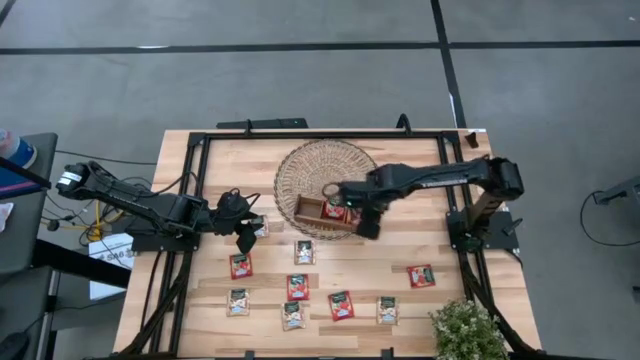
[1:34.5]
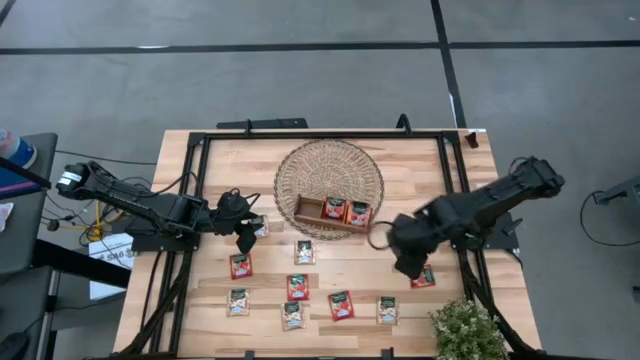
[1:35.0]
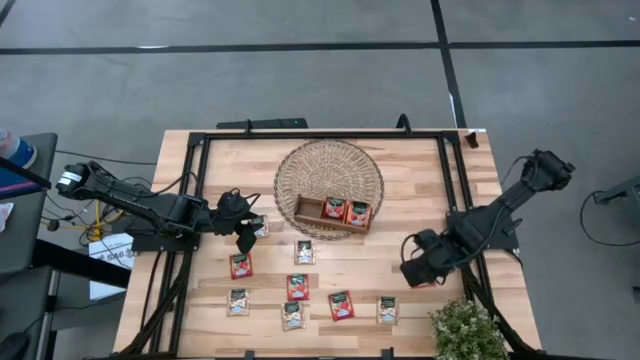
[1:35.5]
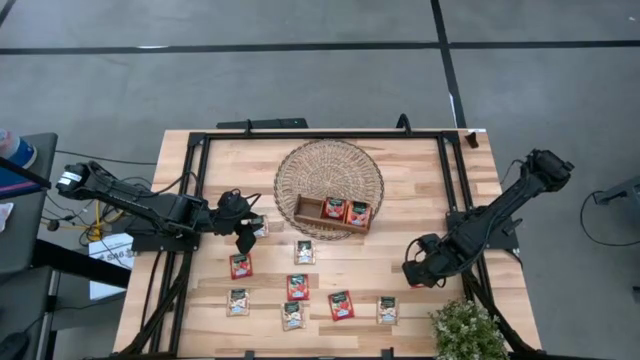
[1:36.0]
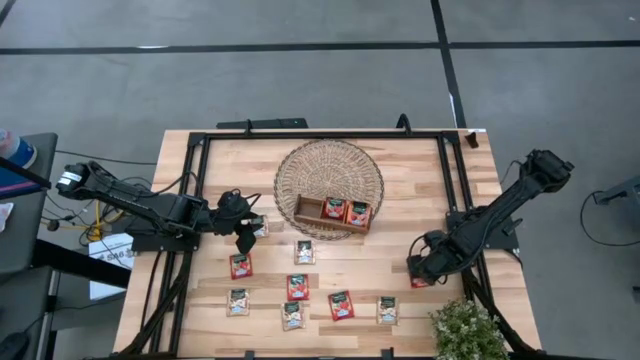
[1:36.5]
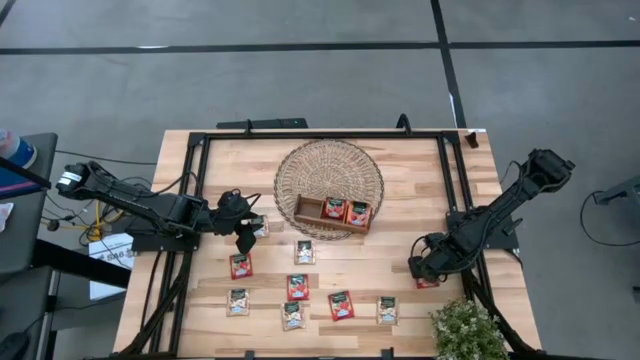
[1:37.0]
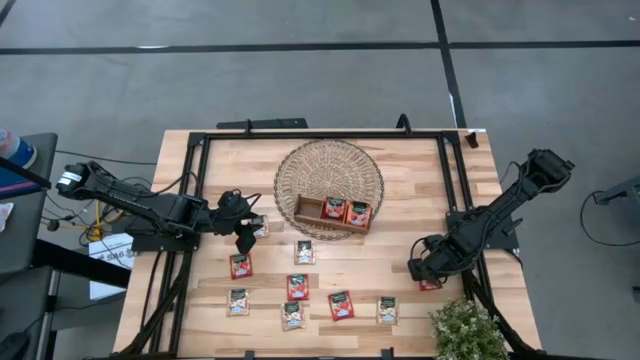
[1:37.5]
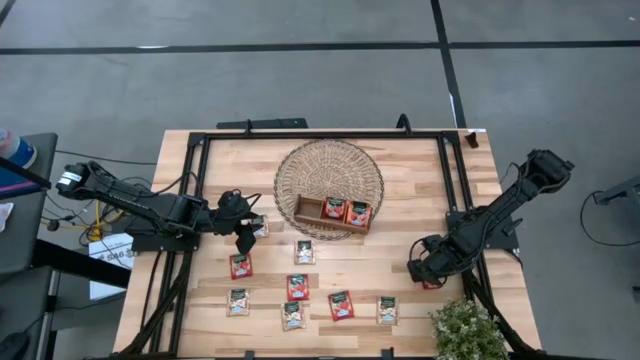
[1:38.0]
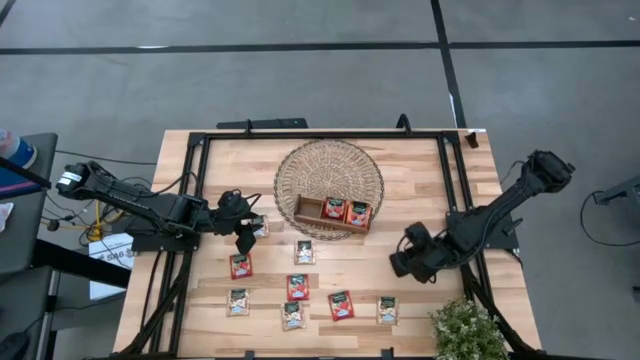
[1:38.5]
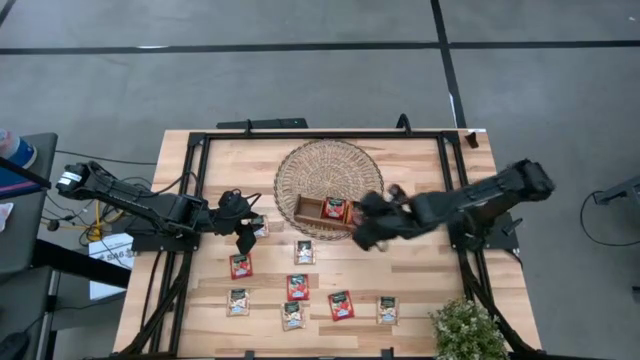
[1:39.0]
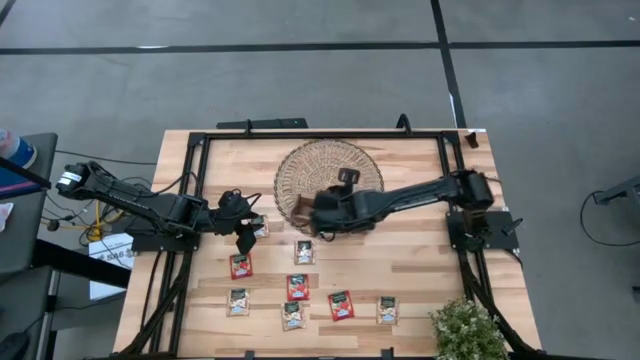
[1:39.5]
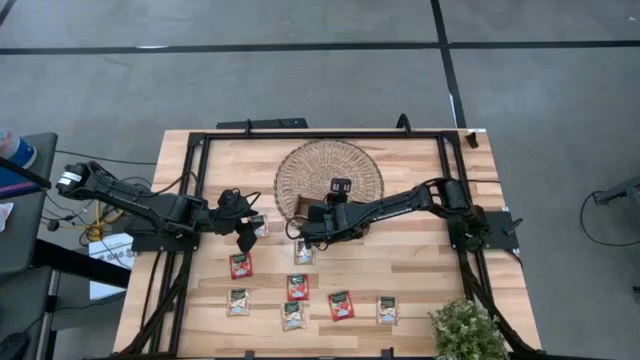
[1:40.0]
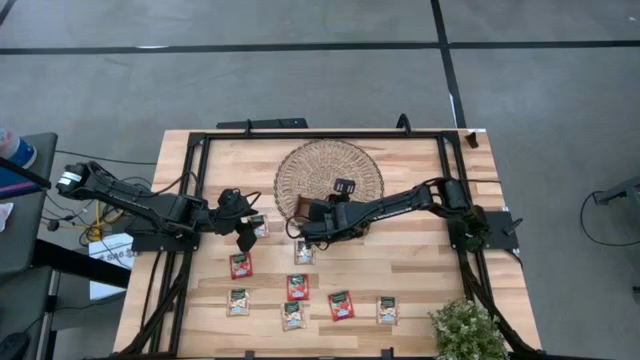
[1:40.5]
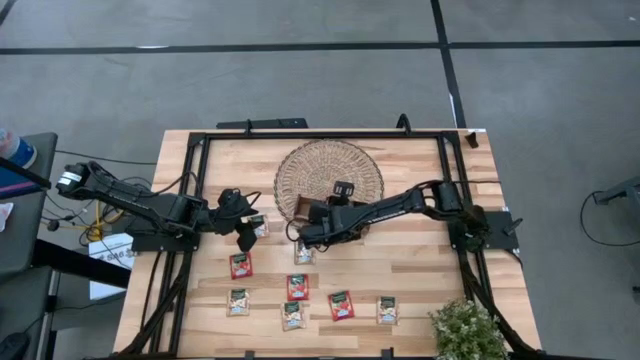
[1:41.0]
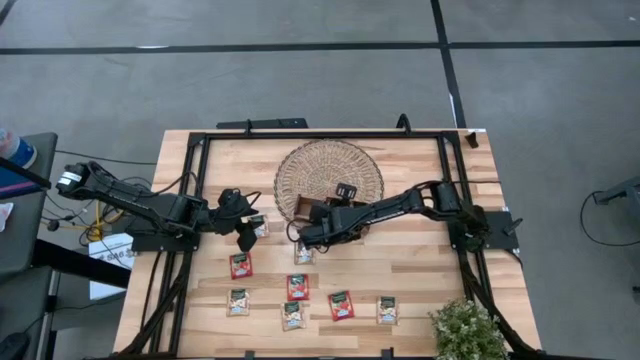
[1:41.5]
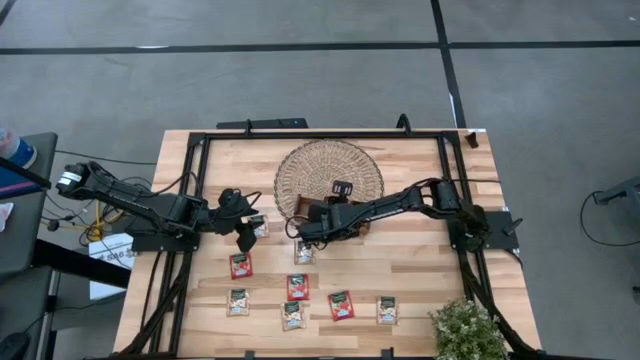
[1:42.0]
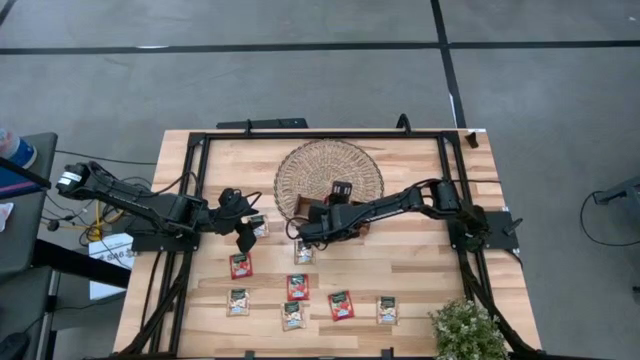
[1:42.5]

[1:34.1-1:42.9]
Task: Pick & Place Tea
Put the red tea bag into the middle section of the wooden organizer

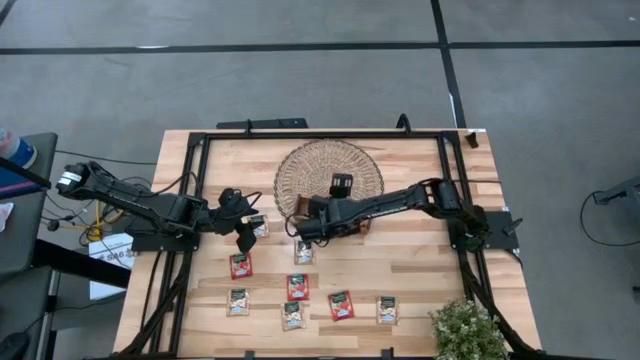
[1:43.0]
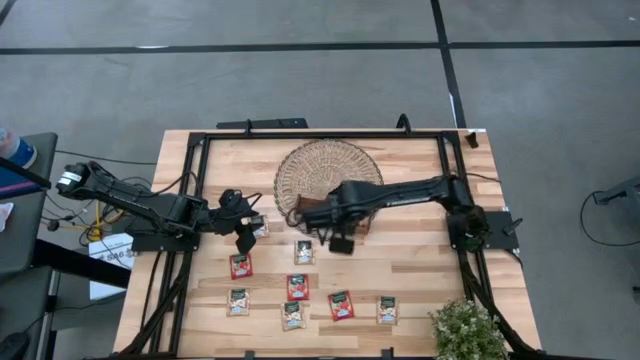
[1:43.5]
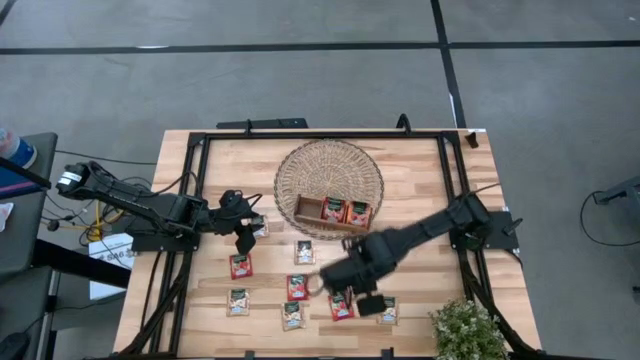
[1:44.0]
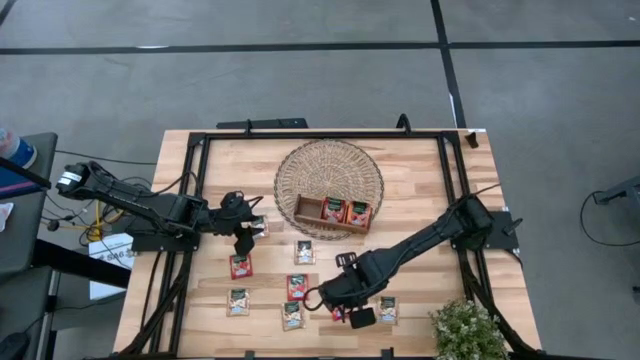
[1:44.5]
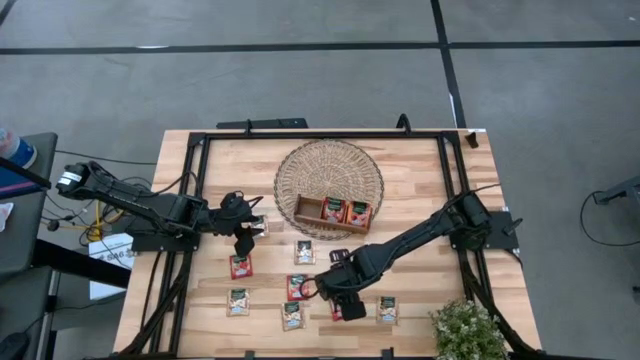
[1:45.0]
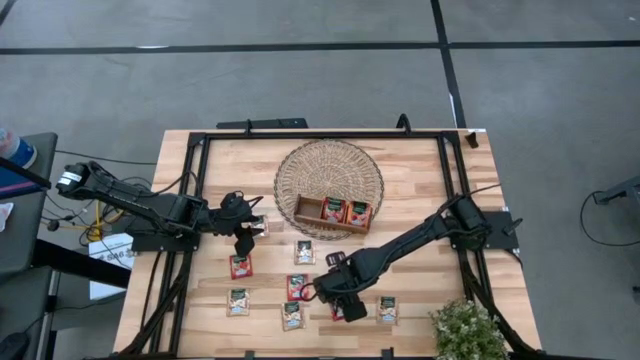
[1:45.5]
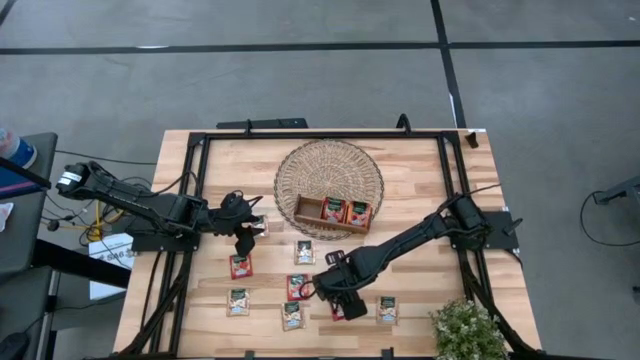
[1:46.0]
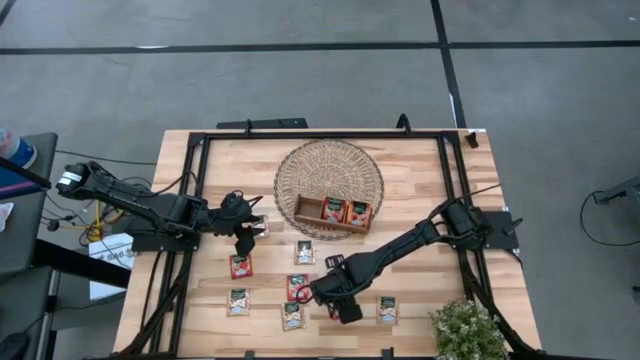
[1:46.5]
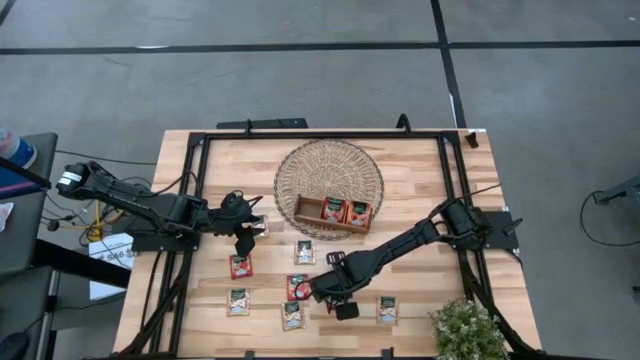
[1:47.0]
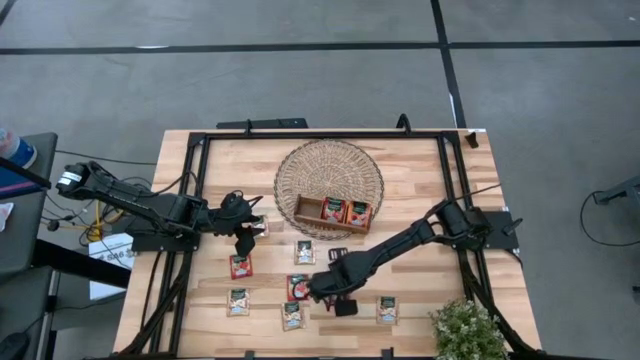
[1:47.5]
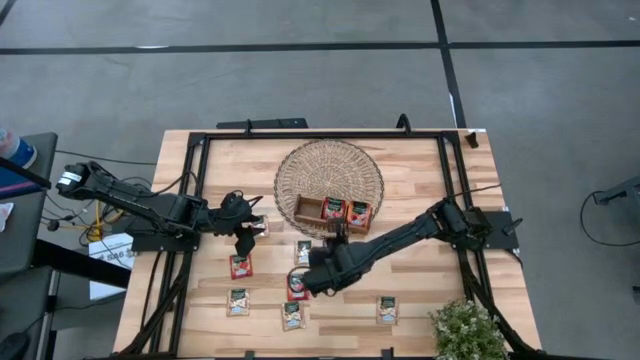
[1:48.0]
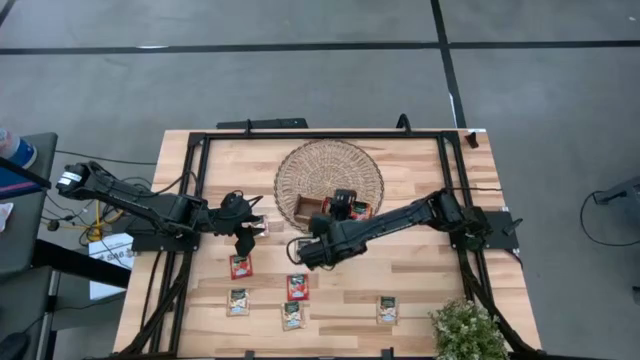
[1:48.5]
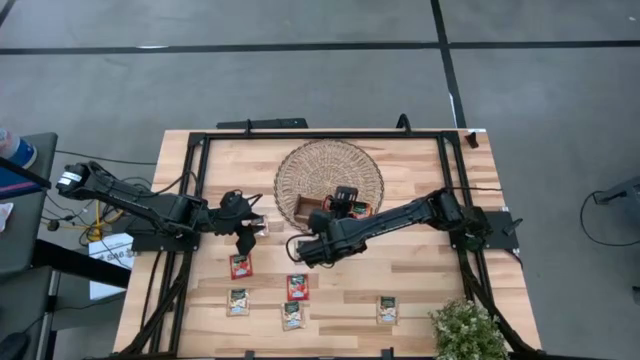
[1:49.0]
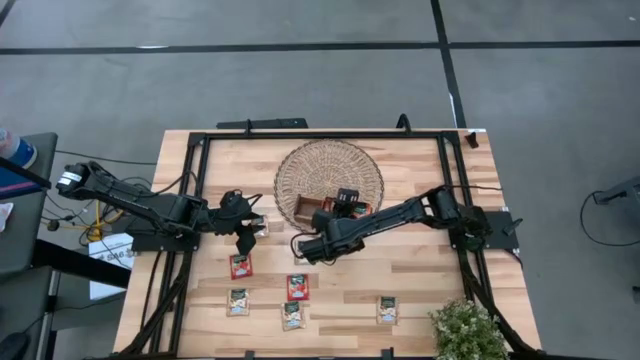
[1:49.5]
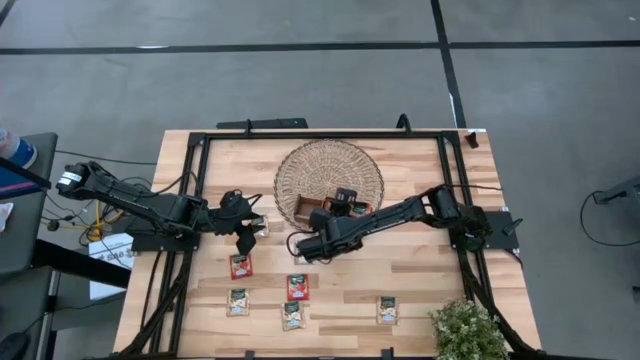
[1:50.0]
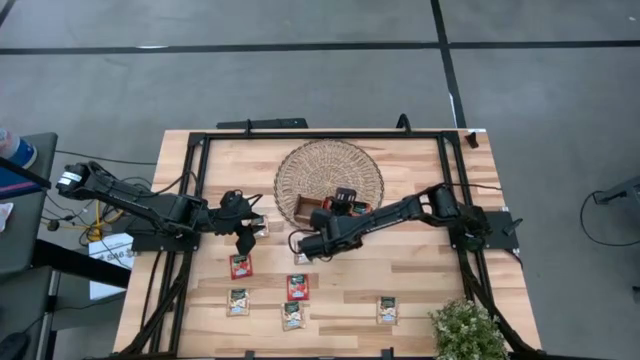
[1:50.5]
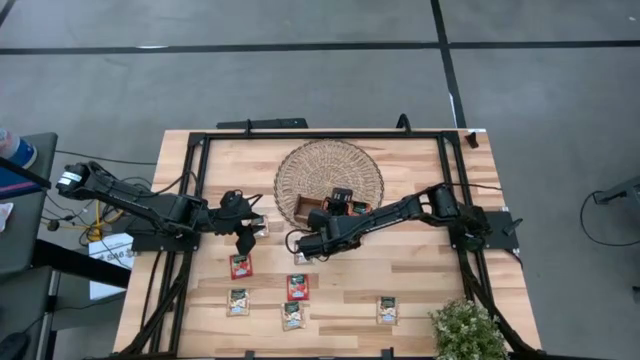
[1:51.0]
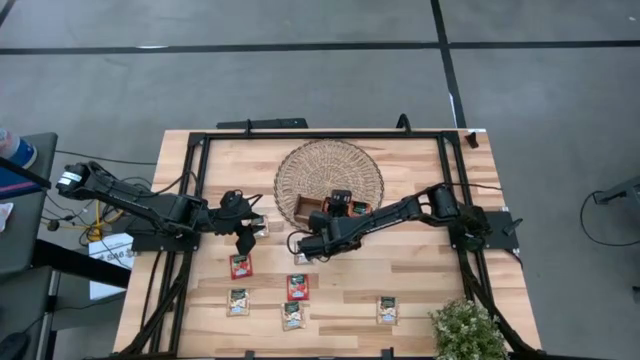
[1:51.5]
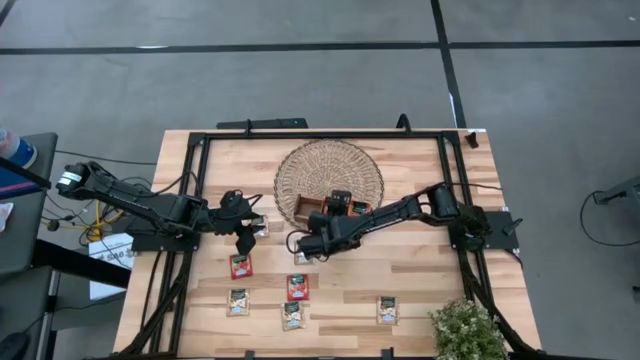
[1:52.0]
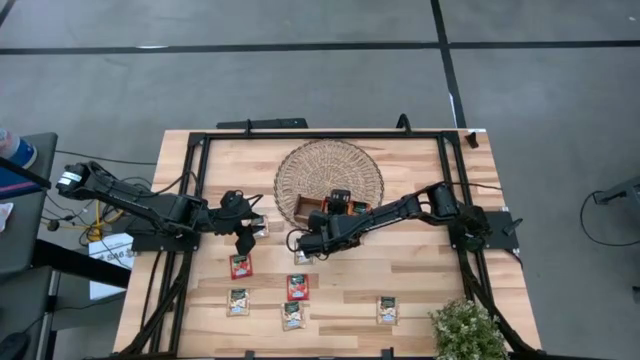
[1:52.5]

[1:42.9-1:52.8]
Put the red tea bag into the middle section of the wooden organizer

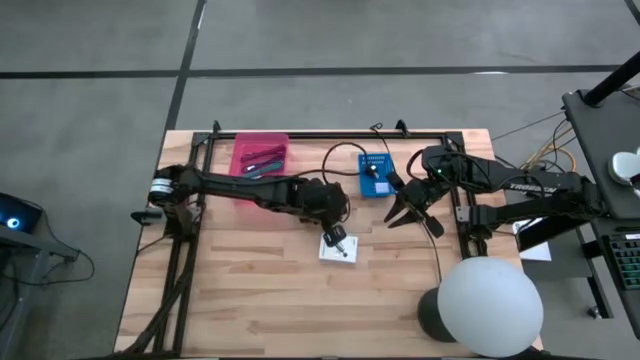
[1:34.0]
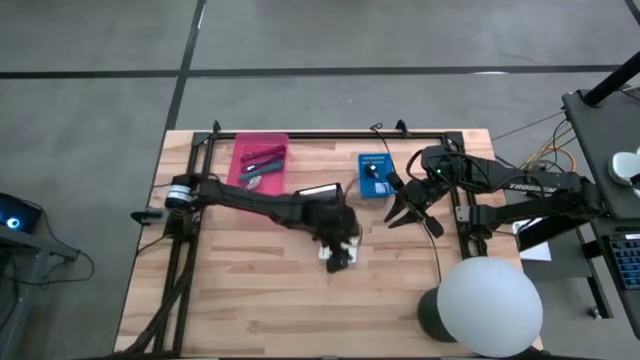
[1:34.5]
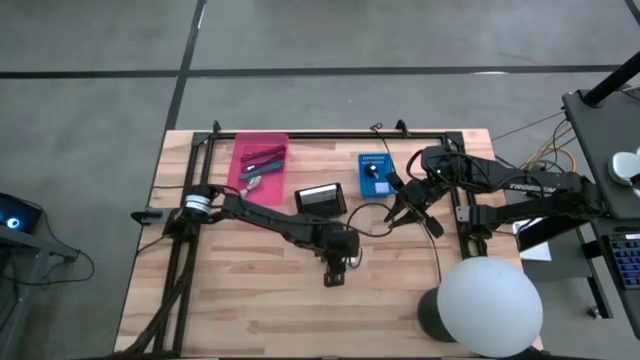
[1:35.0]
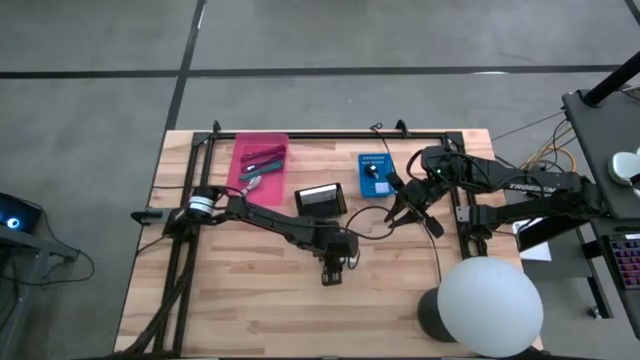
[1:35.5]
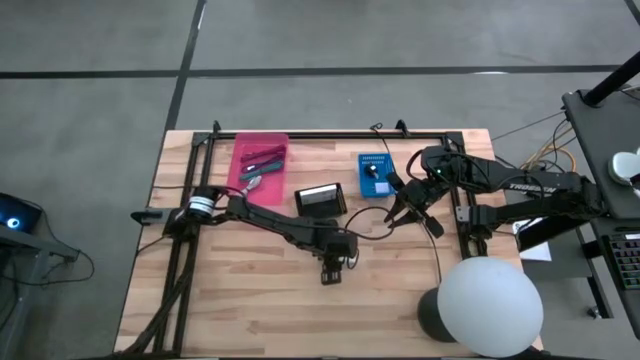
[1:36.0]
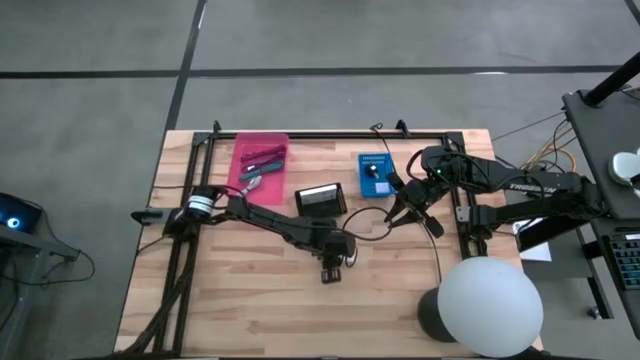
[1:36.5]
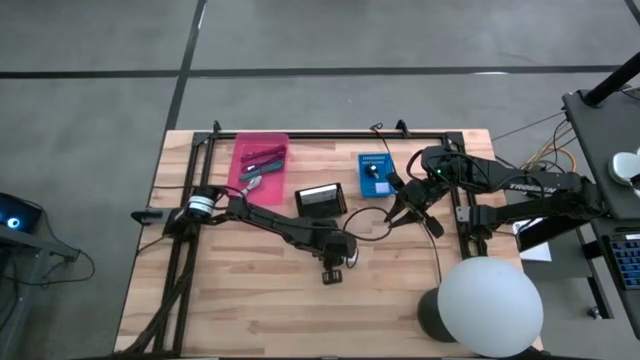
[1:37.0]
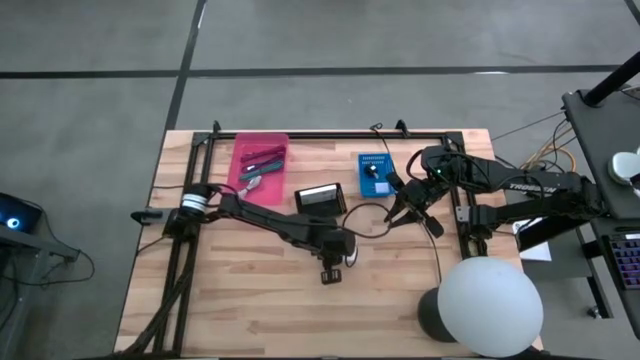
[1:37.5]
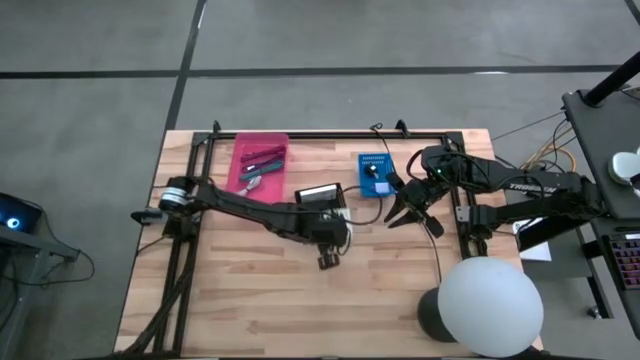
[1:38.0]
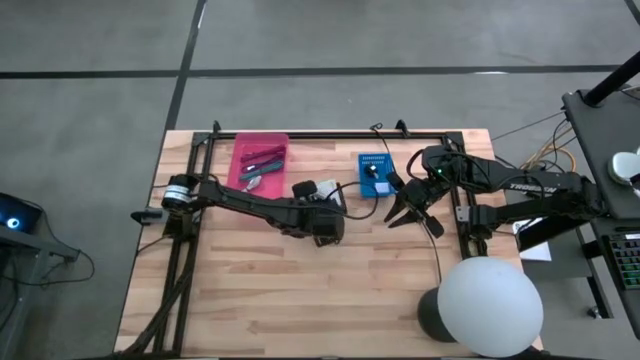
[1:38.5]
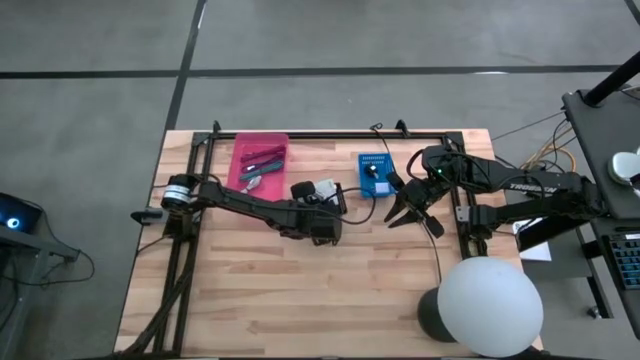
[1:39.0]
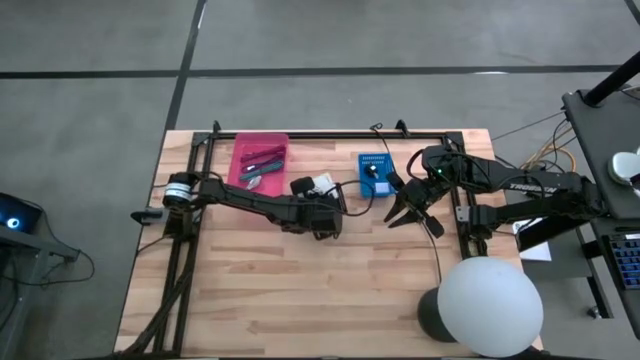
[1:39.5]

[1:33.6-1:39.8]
Task: Pick and place items into bin
Put the white card reader box into the black bin
